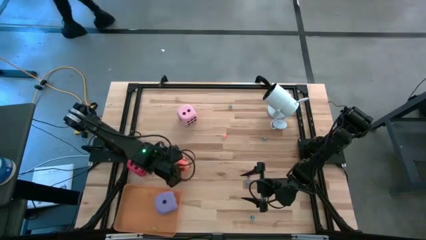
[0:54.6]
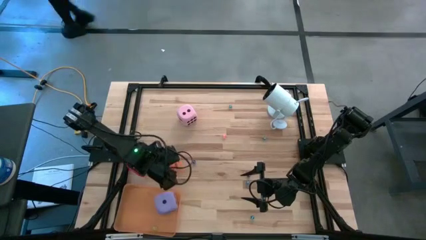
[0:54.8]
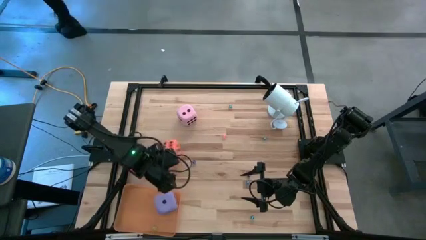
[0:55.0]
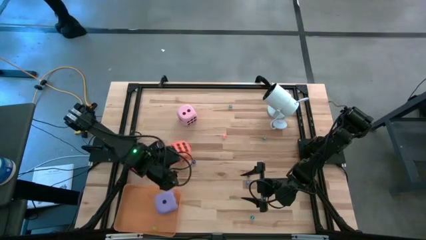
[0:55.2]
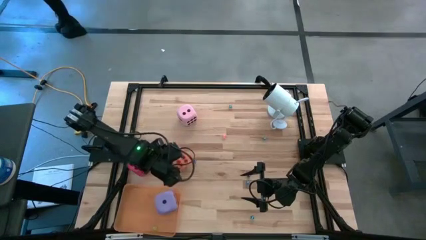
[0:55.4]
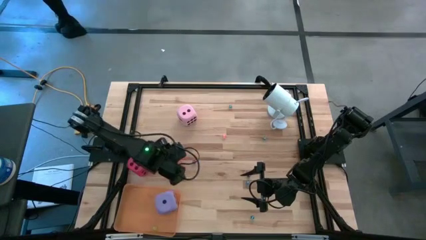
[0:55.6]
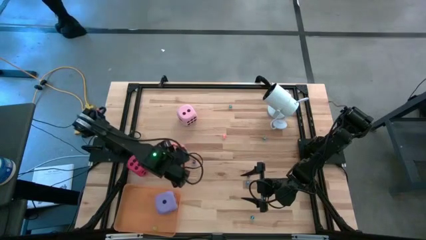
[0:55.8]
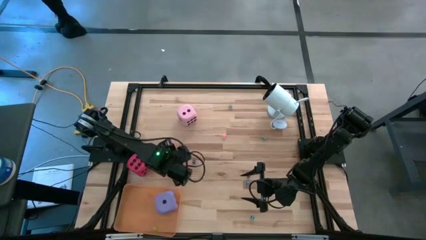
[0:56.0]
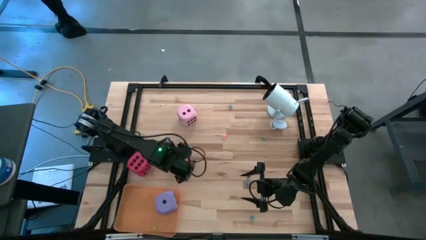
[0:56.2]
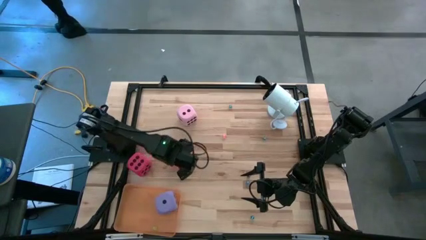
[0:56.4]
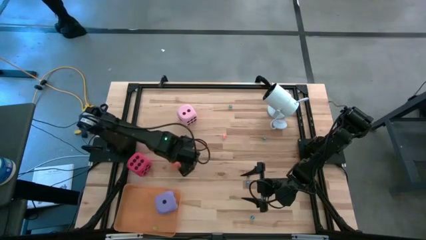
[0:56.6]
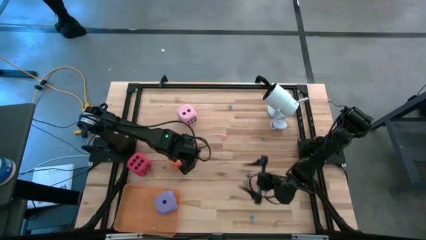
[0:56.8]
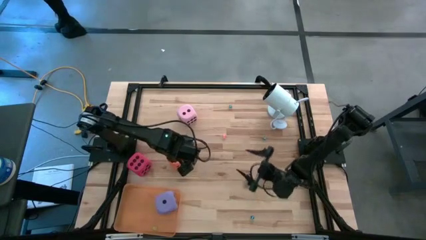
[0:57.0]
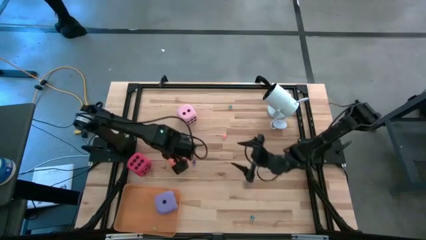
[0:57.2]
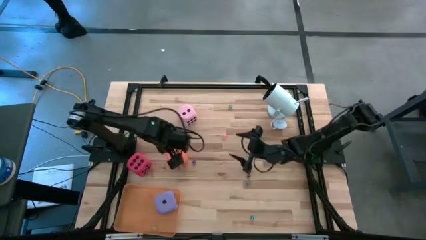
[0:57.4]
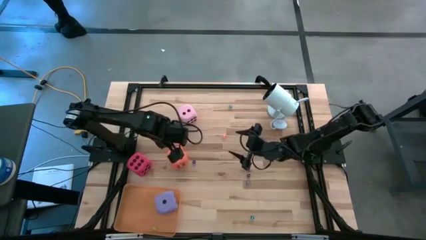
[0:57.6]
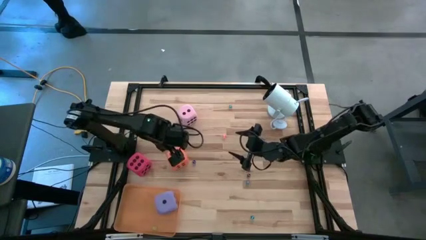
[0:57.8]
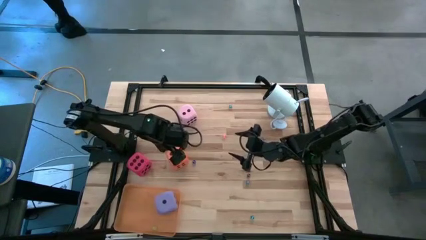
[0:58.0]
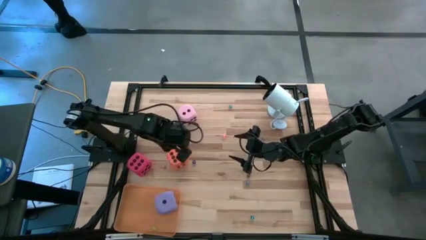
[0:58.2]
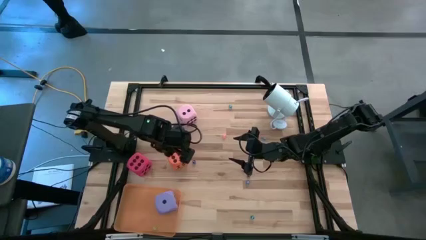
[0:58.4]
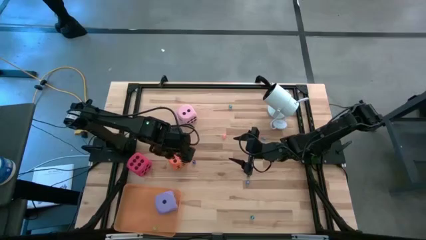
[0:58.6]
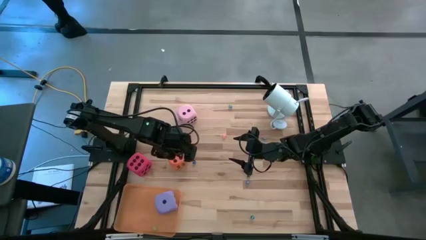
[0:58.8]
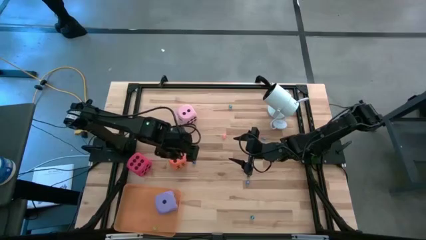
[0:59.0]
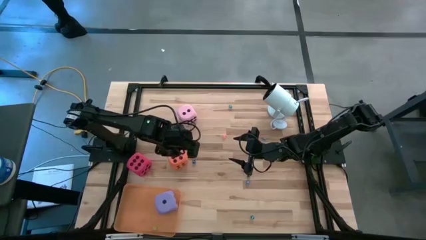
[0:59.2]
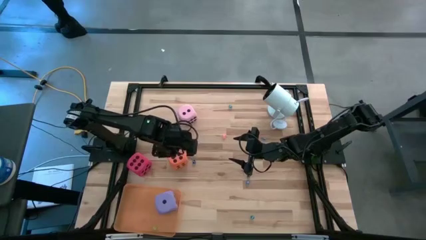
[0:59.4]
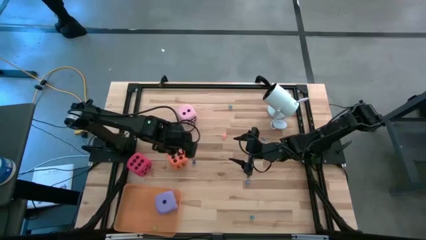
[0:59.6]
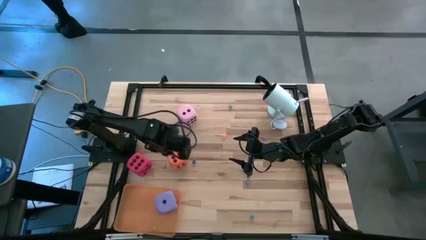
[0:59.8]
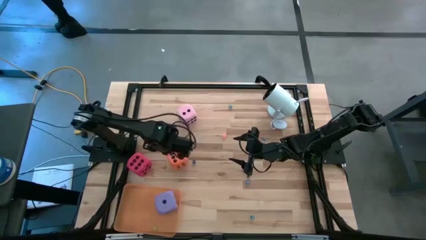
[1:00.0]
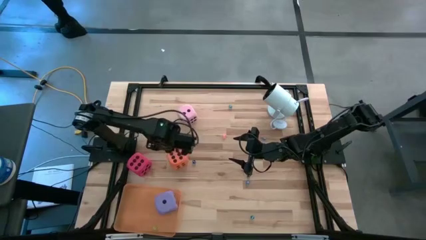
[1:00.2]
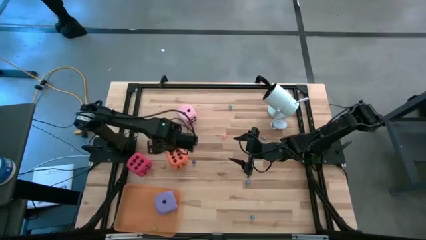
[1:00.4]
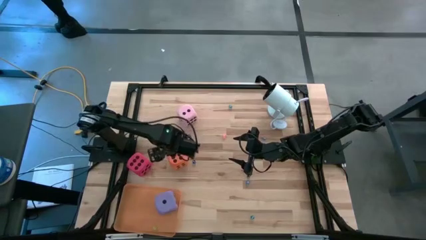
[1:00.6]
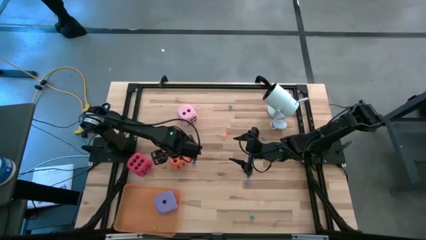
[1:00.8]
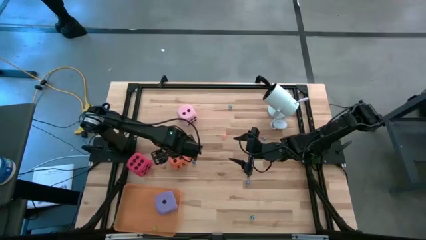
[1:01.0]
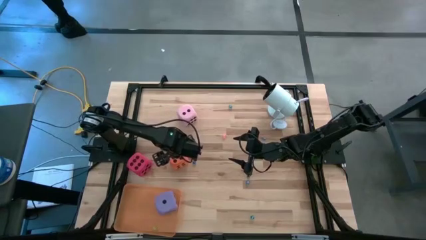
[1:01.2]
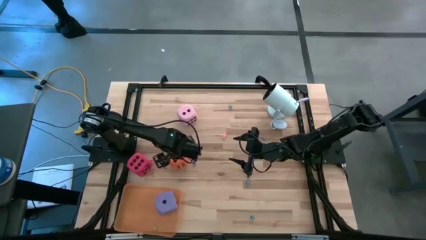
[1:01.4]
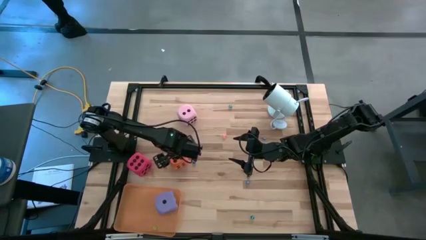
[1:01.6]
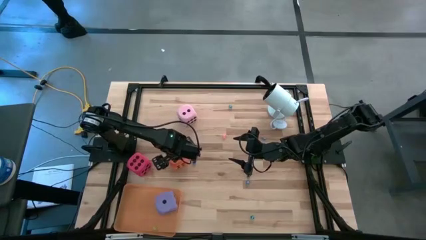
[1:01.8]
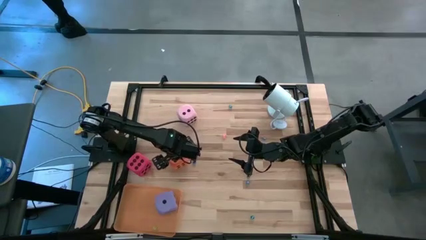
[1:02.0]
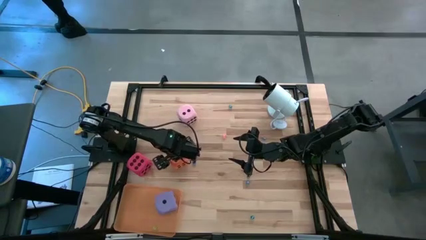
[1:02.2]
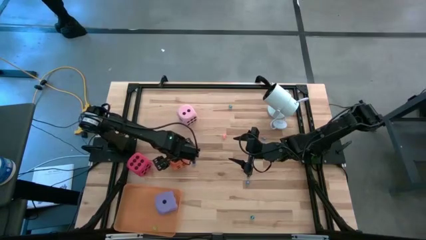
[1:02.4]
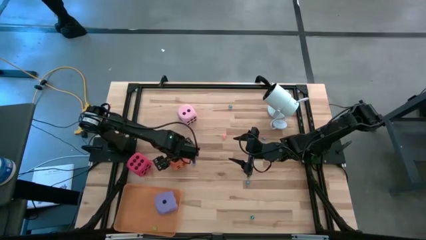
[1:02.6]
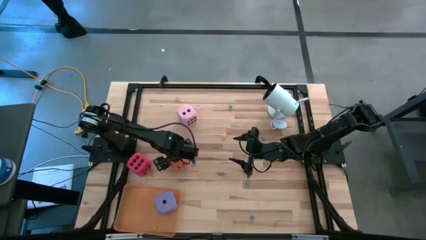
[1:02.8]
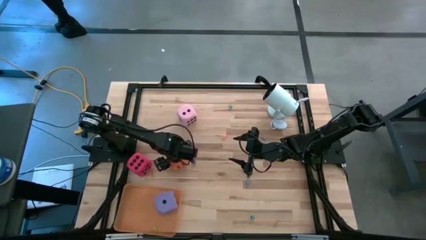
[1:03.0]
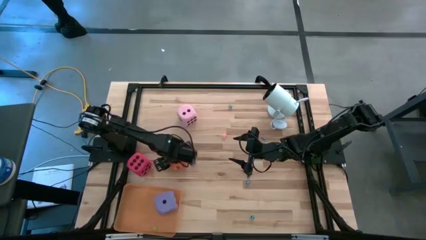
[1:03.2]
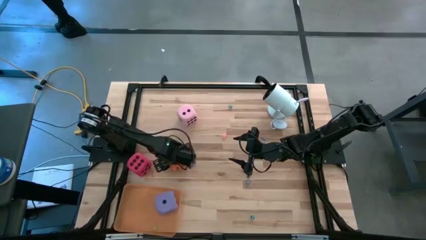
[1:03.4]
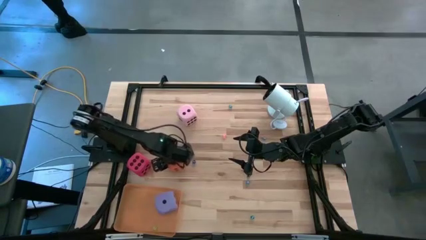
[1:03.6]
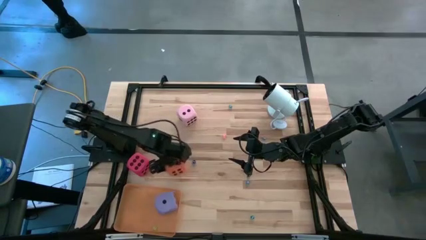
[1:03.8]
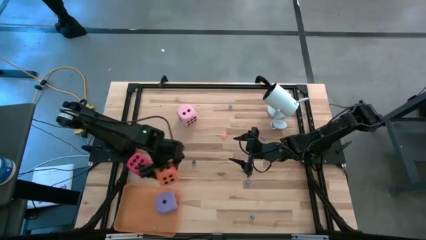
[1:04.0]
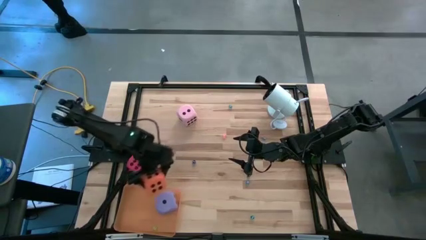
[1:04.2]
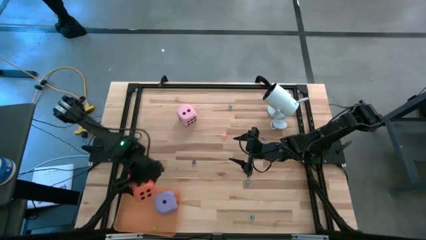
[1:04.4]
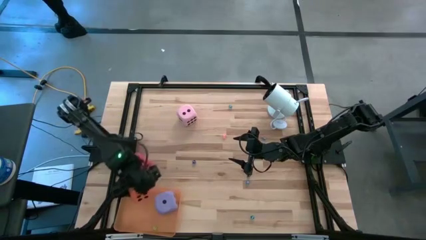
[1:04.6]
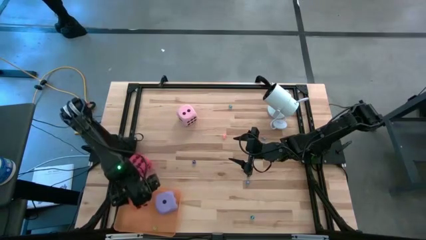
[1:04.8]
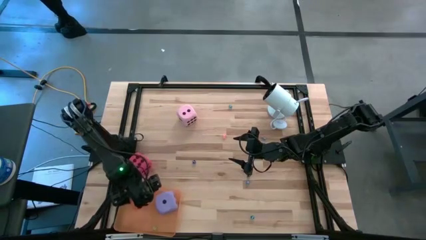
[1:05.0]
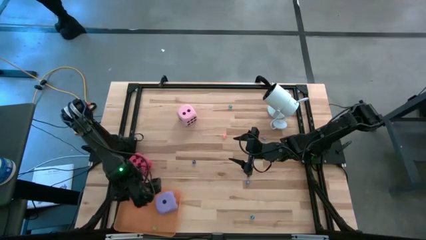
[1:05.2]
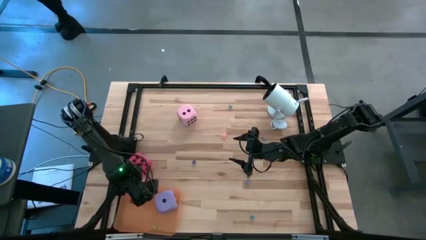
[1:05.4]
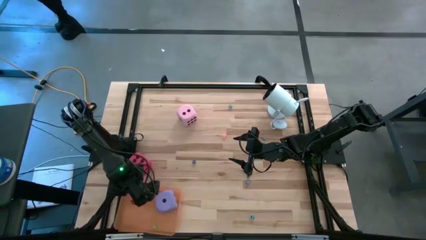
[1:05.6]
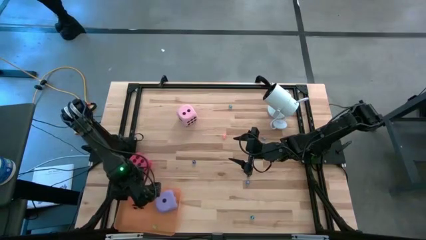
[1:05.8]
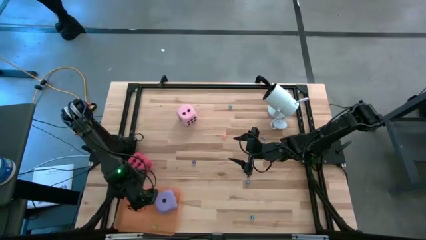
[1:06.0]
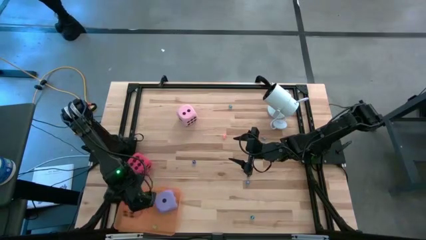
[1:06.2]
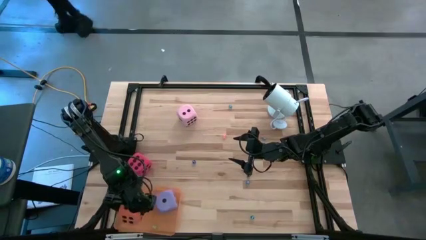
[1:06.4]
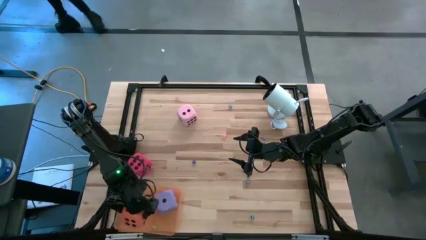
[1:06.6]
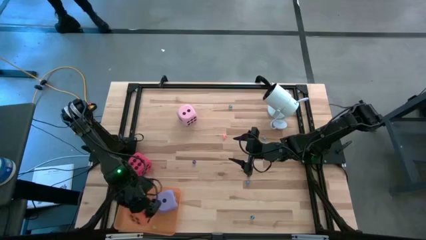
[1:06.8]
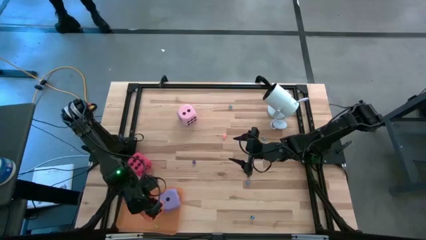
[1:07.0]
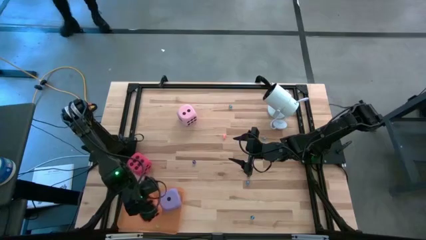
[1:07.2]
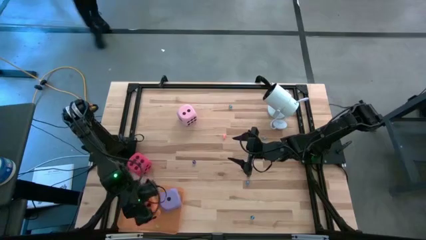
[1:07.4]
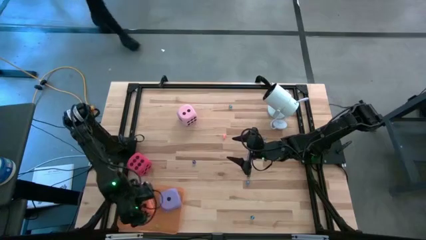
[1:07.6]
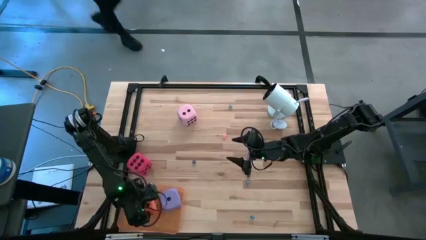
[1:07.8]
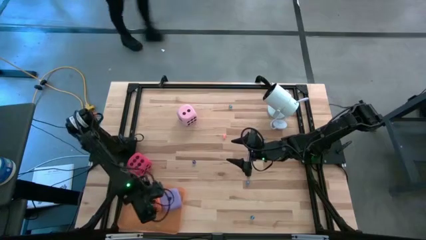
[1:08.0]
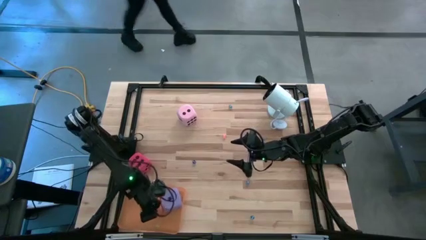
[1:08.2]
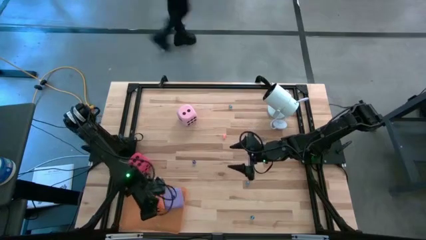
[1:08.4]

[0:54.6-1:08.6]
Task: Pick & Place Dice
Put the large orange dice into the orange bin

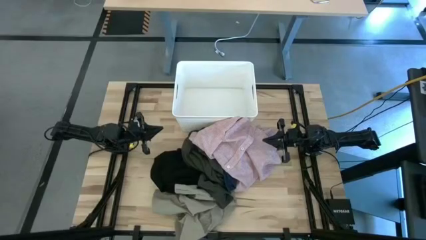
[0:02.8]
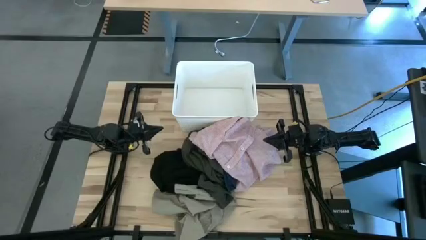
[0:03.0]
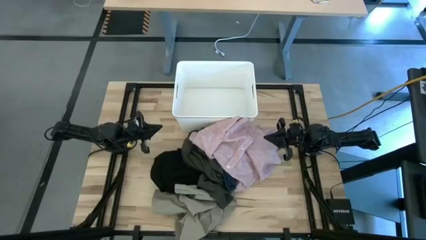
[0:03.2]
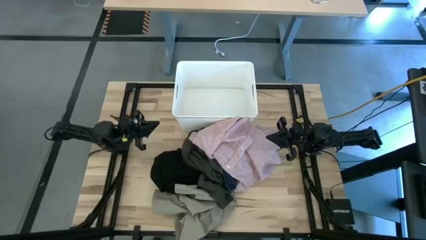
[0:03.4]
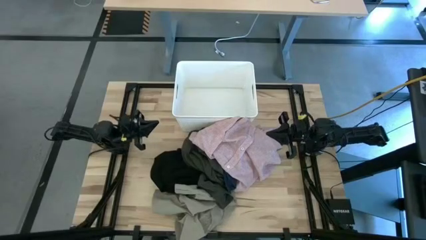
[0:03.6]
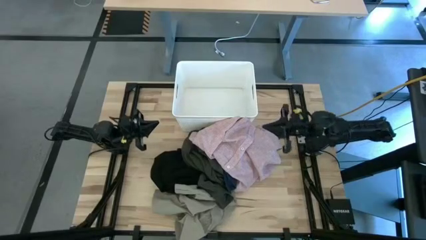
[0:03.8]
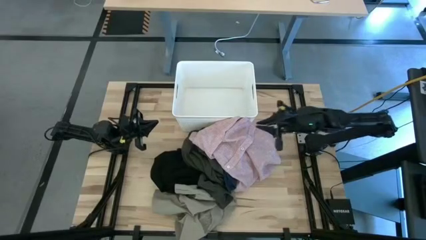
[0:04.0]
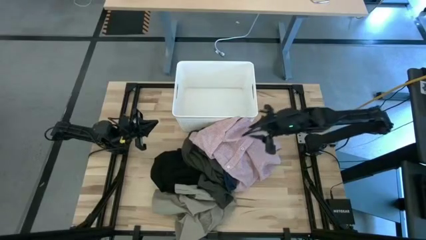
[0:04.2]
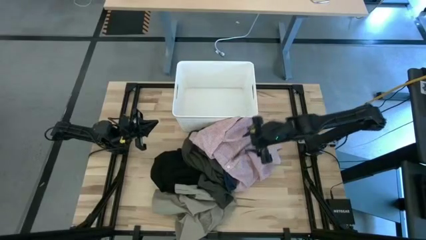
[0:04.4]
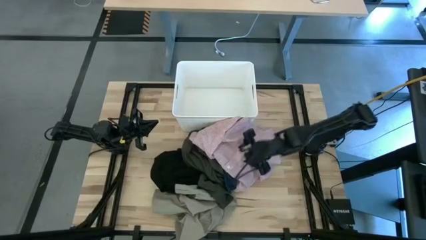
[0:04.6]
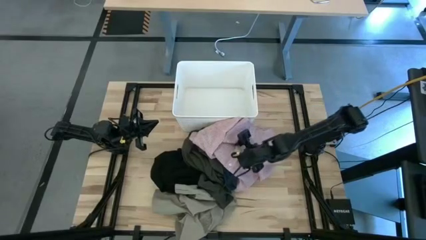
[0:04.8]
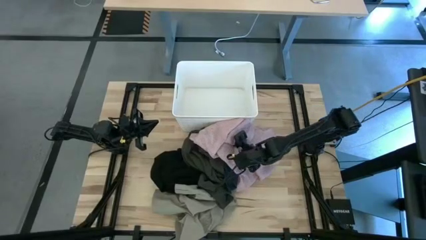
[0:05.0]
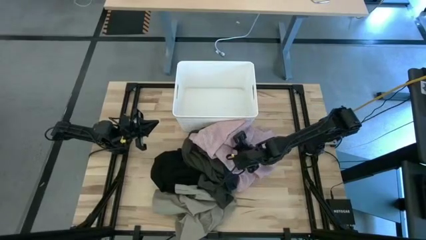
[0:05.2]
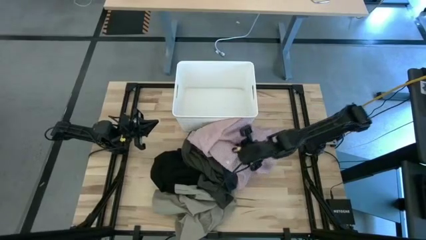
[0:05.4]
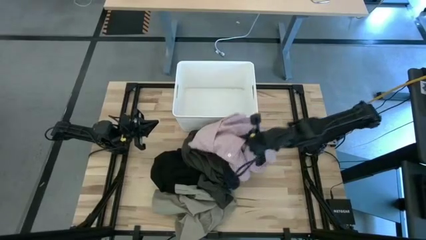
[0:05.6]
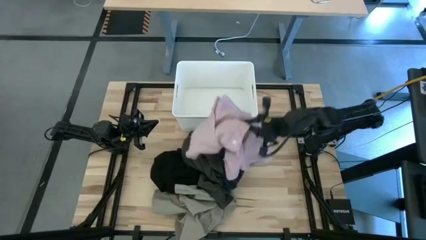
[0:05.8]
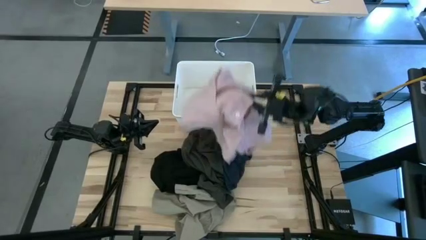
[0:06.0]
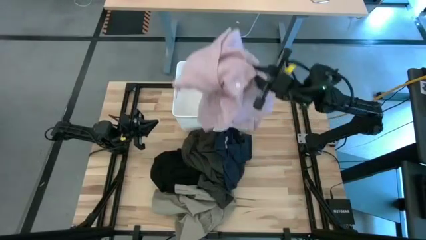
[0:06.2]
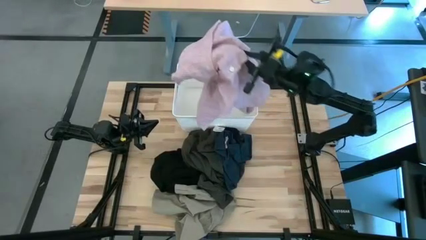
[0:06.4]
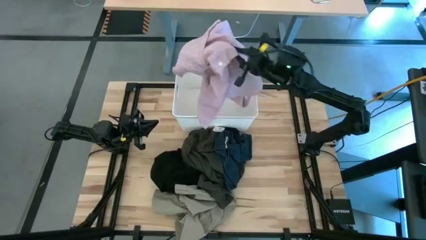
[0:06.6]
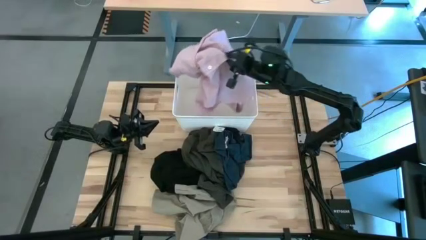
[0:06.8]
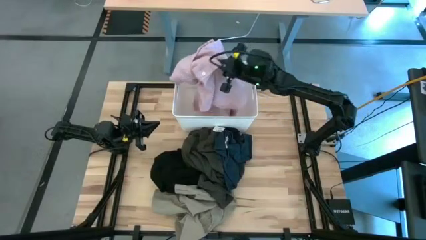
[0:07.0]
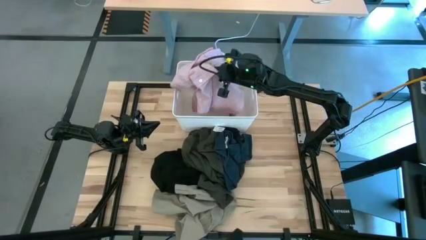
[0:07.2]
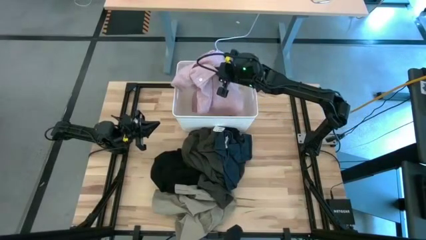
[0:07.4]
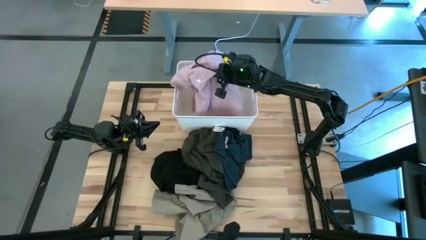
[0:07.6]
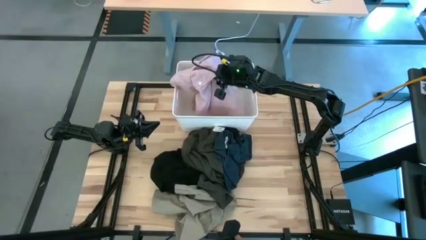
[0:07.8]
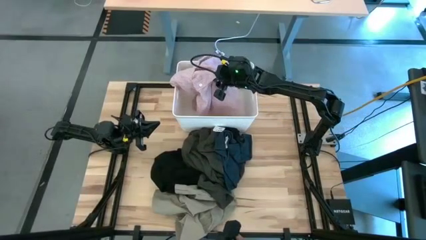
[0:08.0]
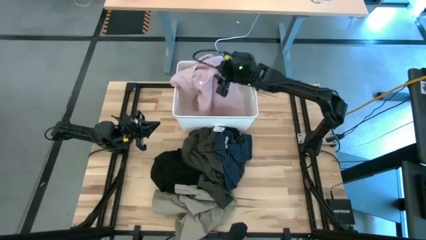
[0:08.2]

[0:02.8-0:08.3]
Task: Sort clothes
Put the pink polo into the white laundry bin
